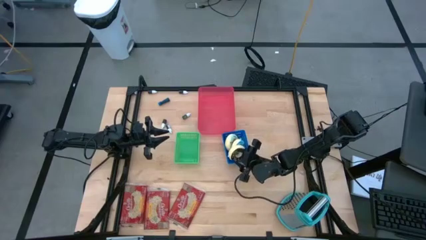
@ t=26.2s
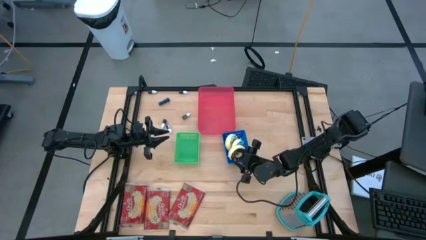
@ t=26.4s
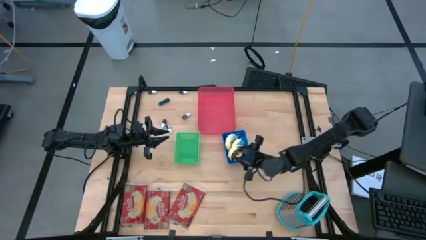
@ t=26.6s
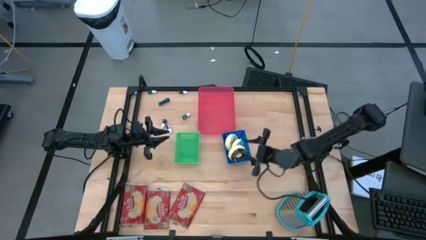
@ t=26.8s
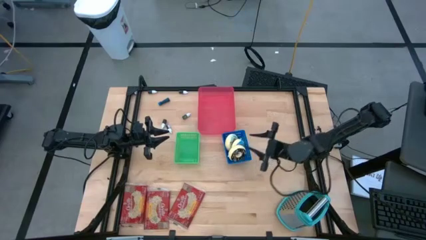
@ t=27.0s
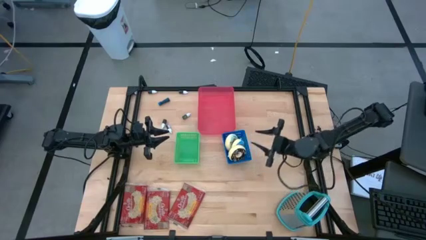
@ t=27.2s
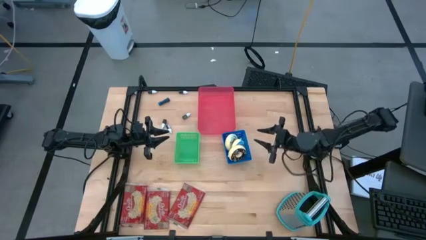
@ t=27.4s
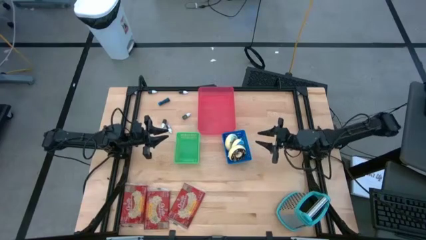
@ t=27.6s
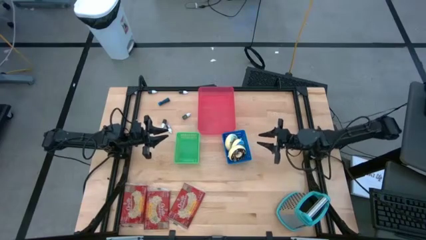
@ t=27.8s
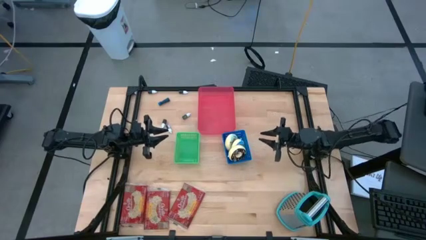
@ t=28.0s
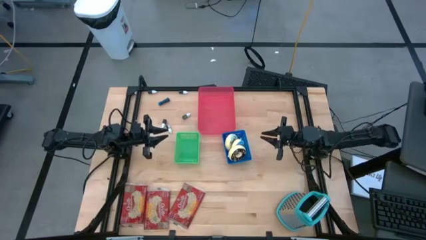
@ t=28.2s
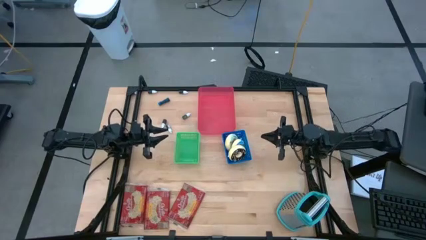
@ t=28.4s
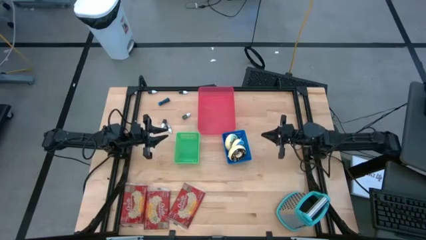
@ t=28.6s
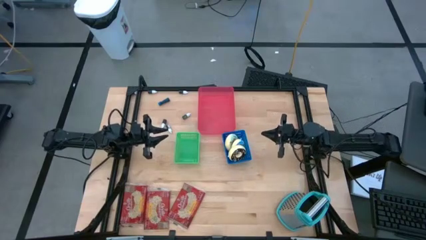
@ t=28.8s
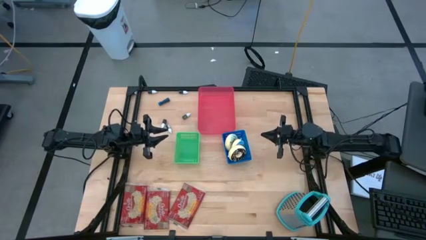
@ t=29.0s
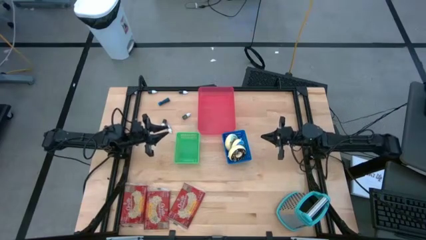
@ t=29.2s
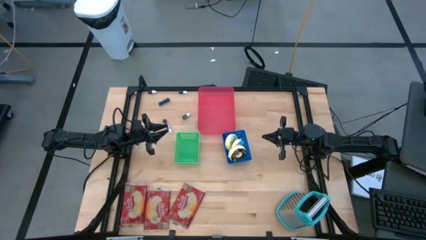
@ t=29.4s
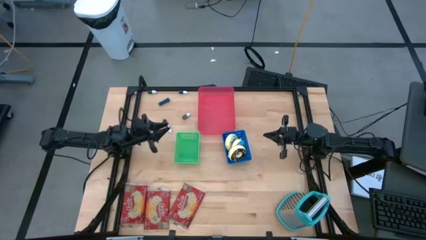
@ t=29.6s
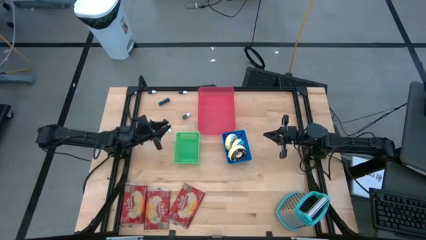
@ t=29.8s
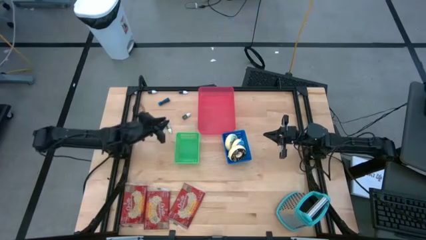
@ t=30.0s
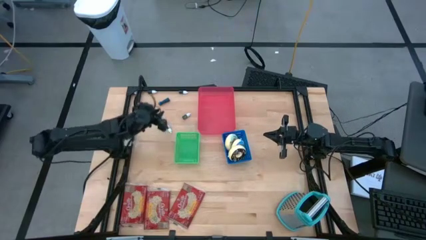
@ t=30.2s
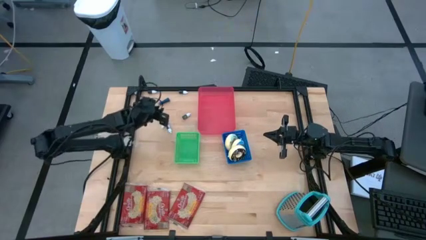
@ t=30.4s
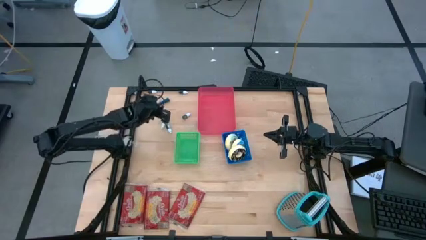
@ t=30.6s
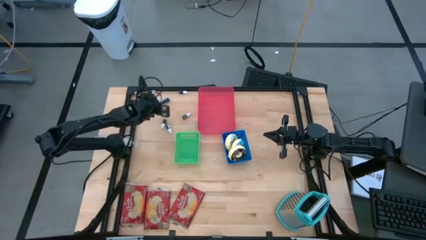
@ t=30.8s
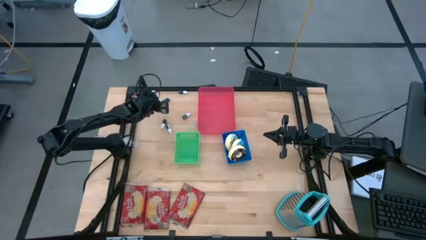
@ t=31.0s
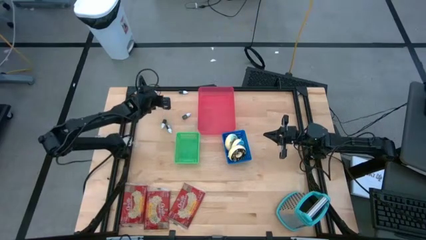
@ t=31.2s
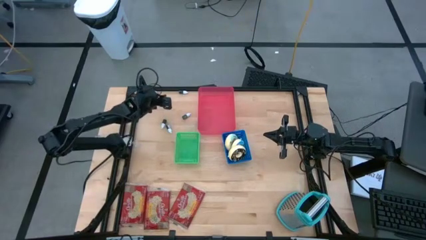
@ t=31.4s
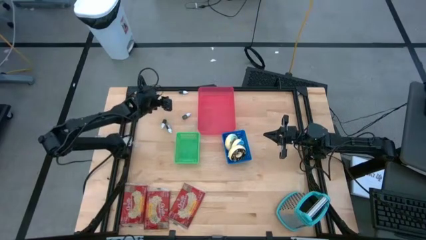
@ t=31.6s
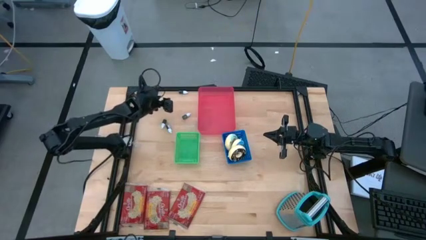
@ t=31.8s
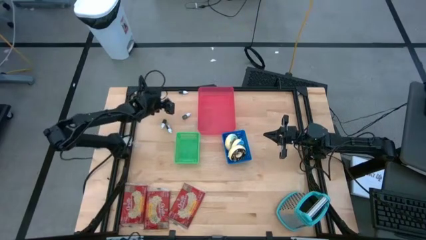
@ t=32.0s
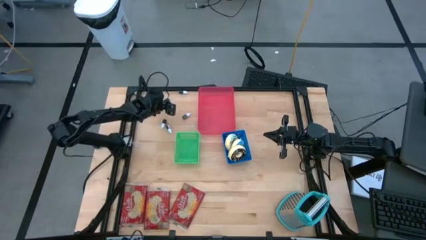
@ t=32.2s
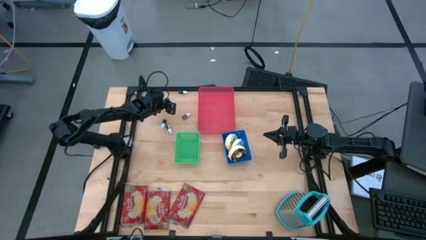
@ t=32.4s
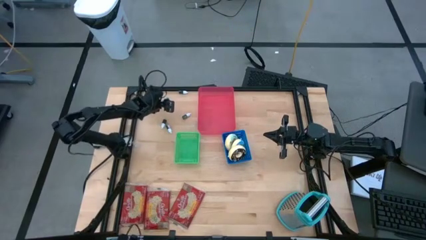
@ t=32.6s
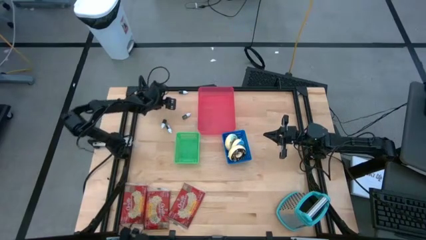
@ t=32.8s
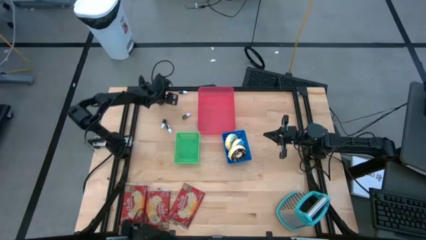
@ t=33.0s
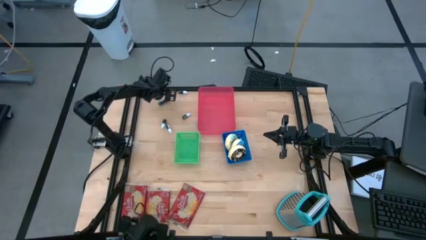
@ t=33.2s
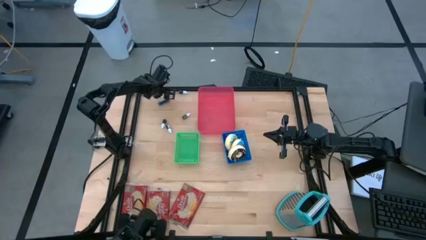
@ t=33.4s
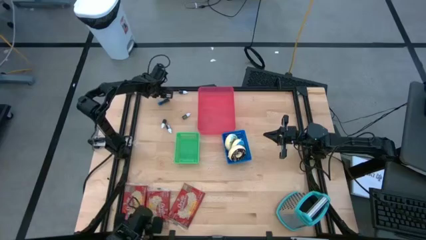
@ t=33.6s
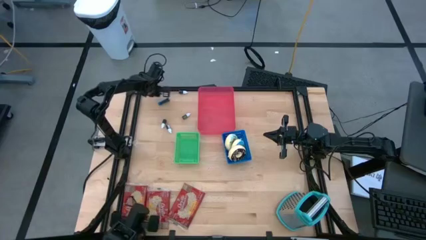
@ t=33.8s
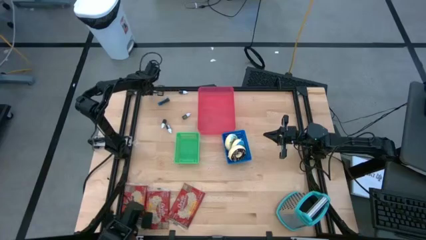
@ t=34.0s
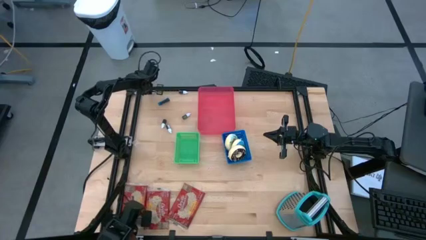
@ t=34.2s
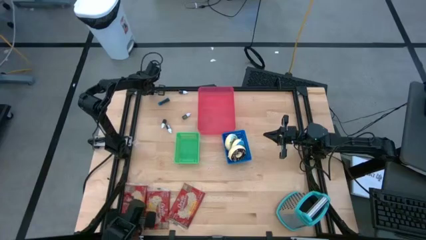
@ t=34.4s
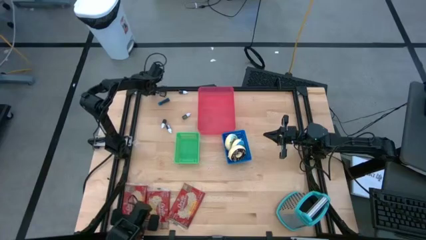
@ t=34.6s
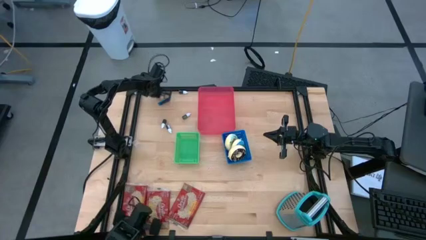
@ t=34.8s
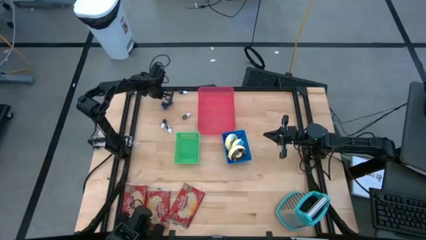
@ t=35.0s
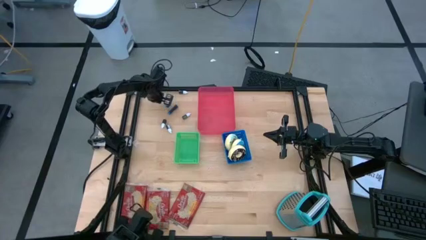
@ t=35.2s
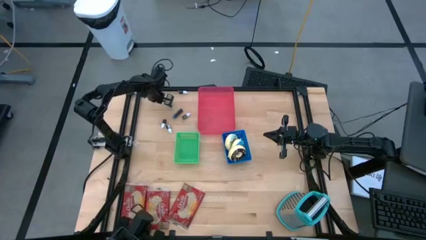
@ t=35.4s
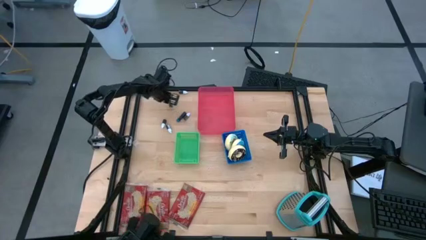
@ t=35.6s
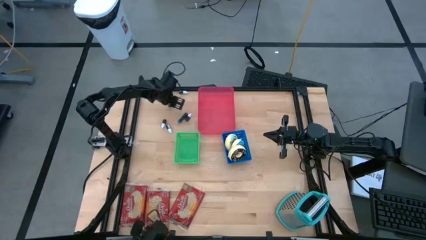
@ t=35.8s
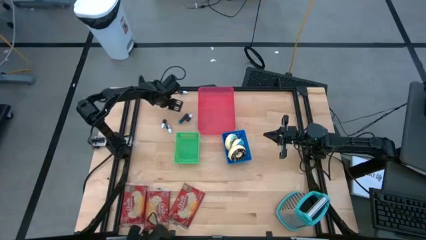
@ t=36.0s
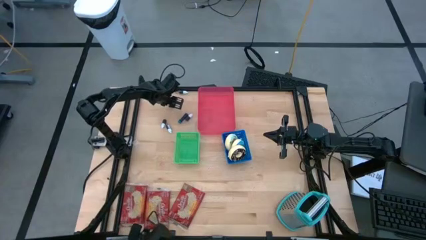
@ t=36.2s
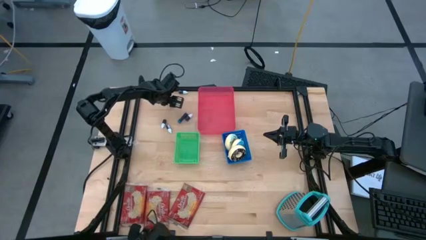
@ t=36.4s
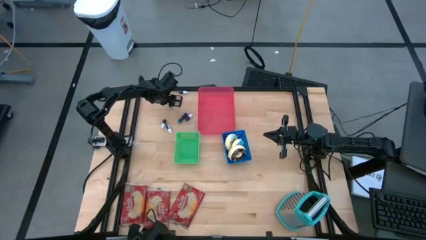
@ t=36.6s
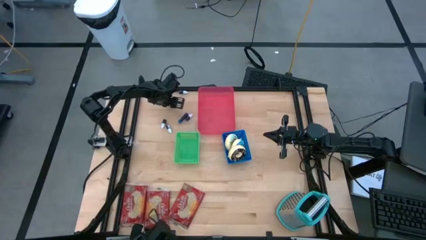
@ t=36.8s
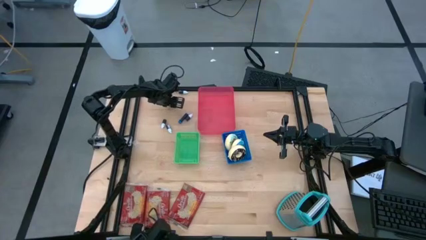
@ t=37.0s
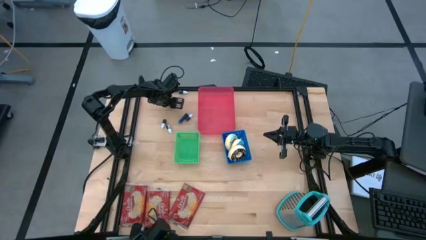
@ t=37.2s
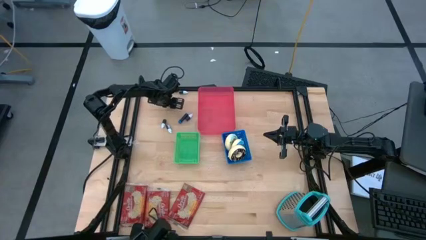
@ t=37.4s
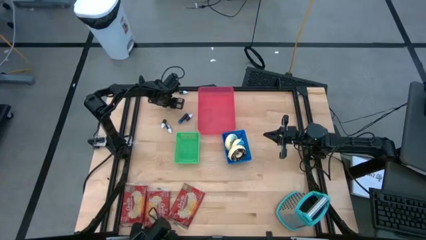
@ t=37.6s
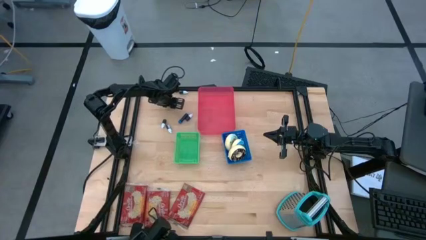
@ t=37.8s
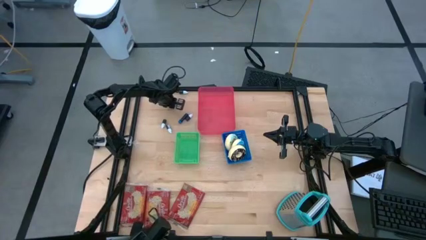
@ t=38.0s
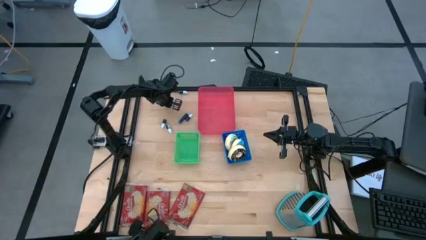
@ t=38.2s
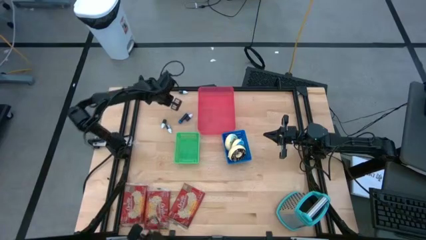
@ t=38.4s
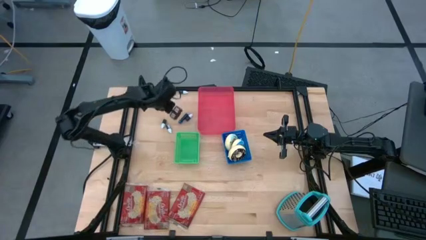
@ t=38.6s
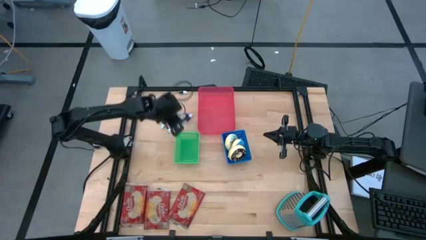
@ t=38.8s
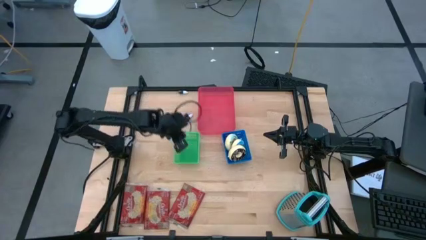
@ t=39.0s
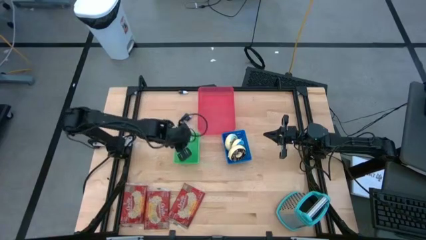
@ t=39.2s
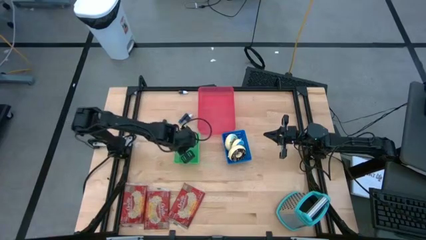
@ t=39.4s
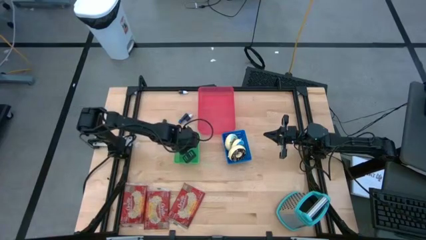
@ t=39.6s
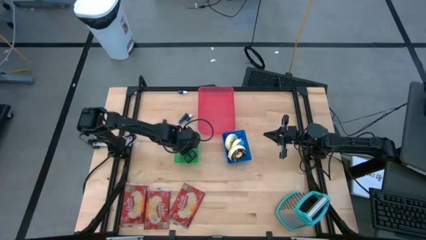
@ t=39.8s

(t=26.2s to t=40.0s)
Put the purple food coloring bottle into the green bin
